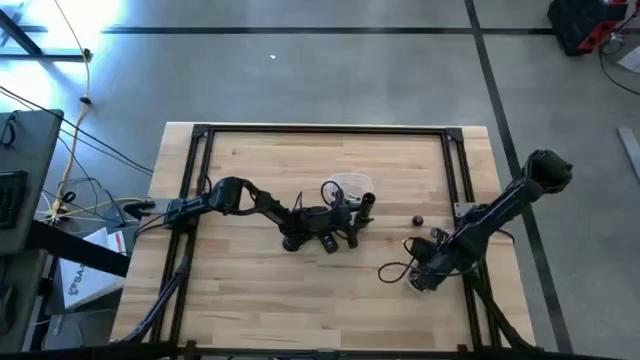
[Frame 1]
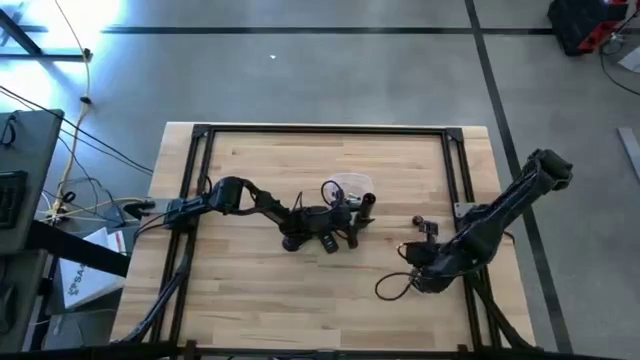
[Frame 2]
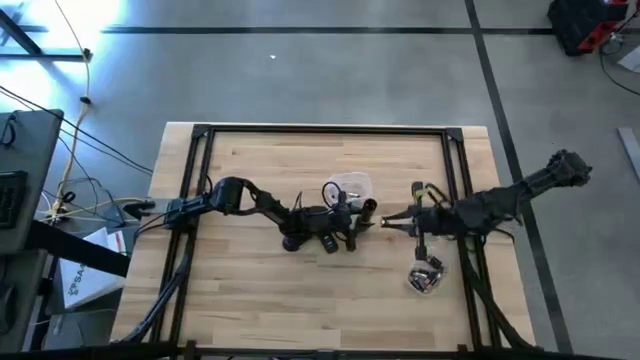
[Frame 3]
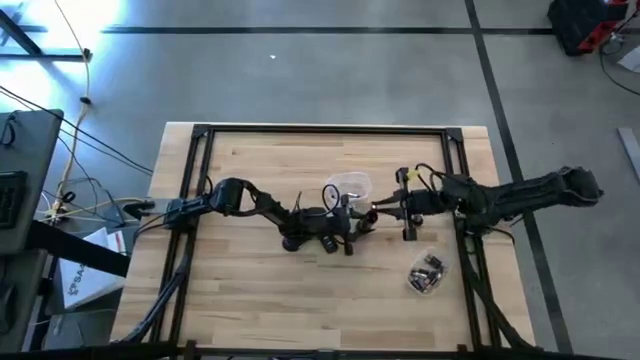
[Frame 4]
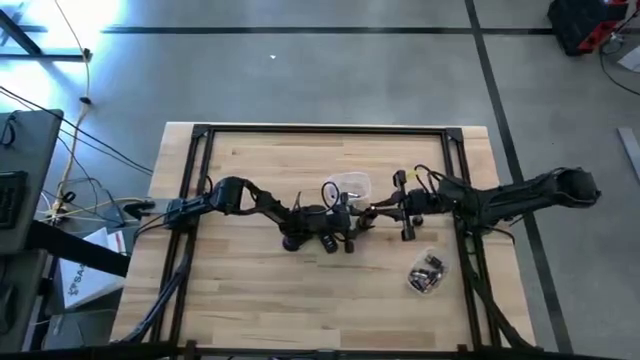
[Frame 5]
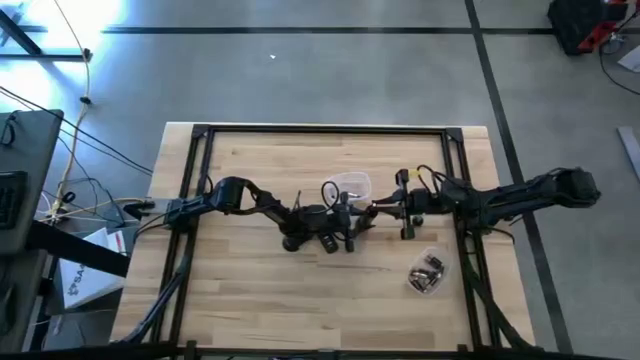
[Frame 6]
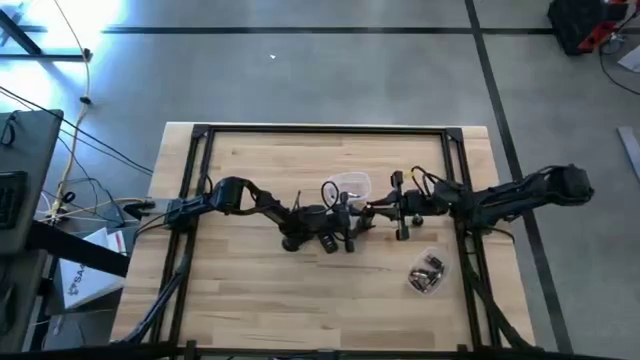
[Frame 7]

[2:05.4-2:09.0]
Task: Insert battery
Insert the black battery into the flashlight

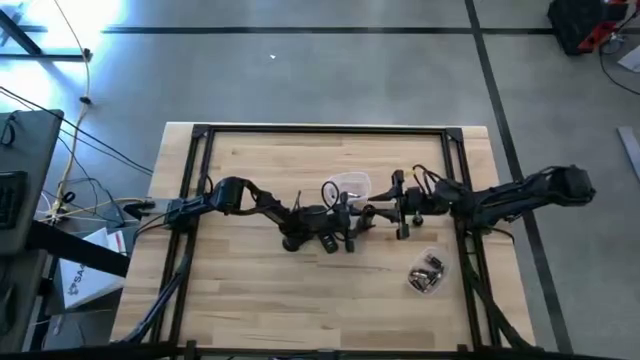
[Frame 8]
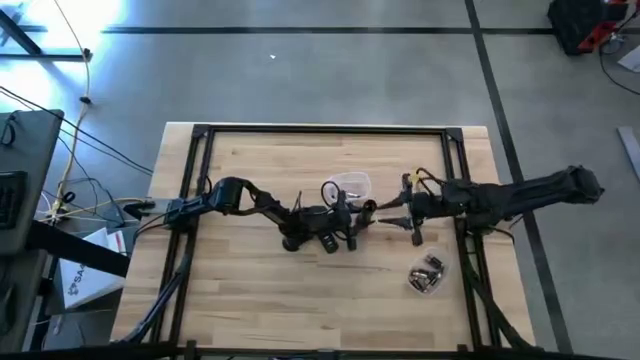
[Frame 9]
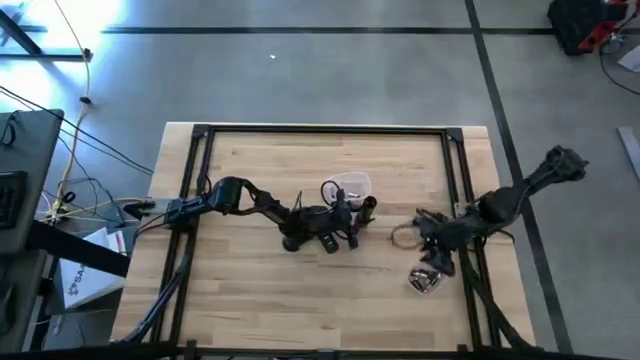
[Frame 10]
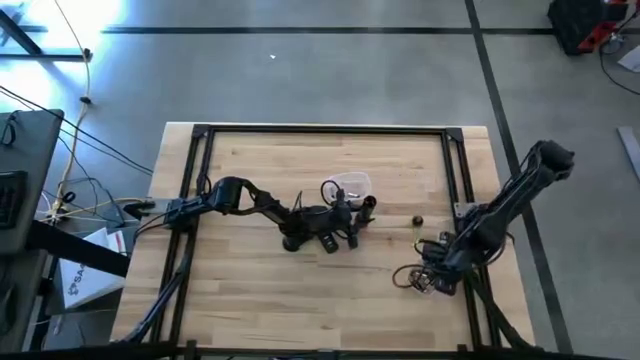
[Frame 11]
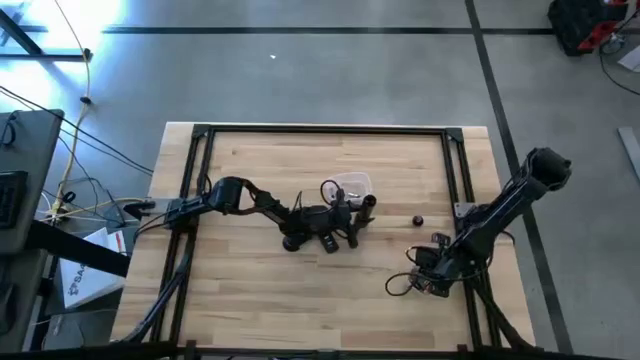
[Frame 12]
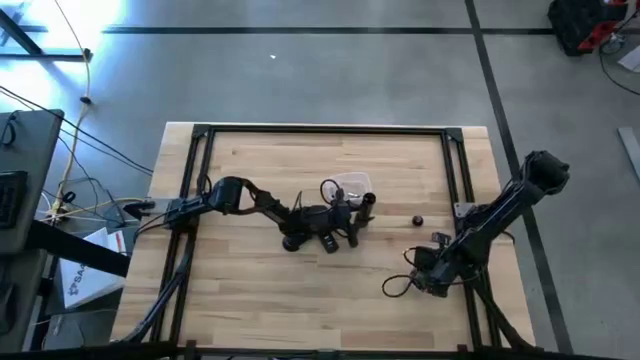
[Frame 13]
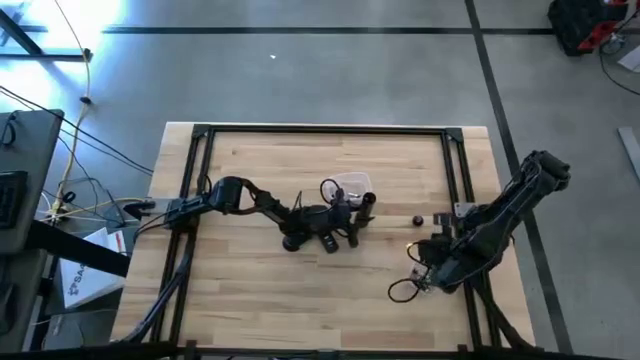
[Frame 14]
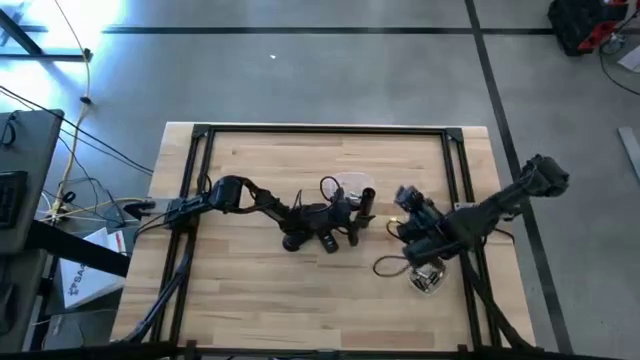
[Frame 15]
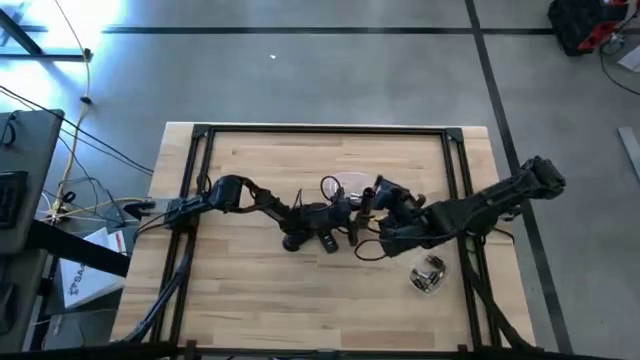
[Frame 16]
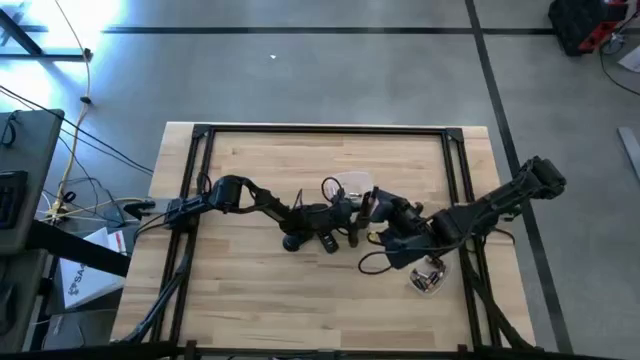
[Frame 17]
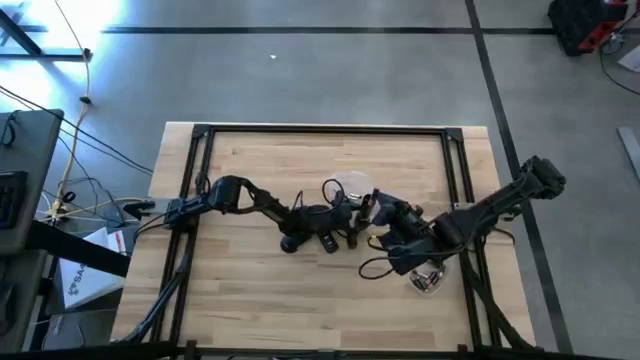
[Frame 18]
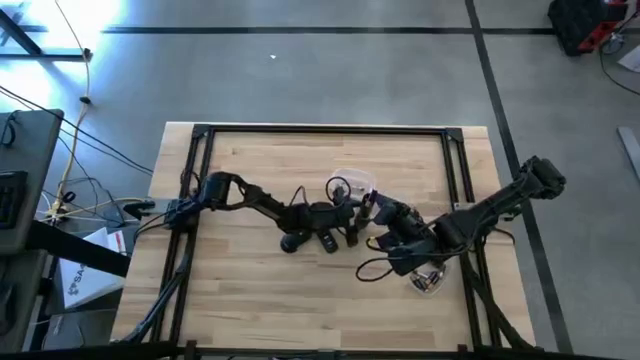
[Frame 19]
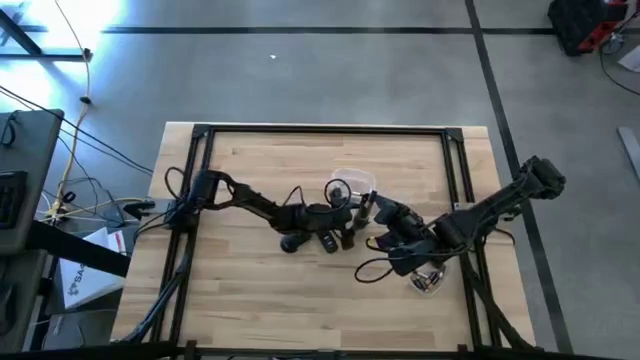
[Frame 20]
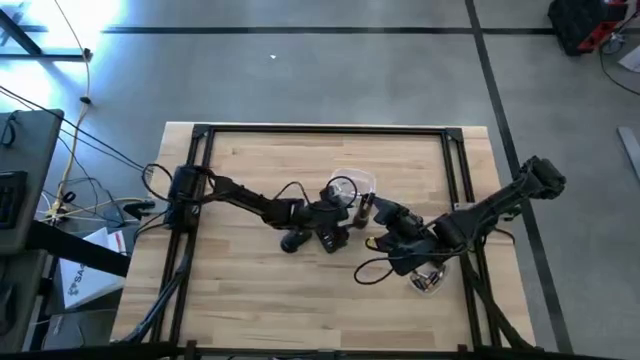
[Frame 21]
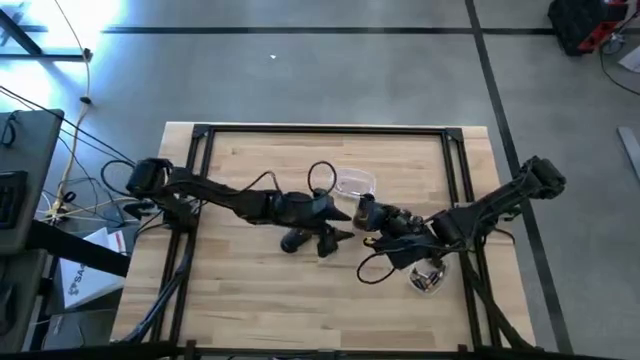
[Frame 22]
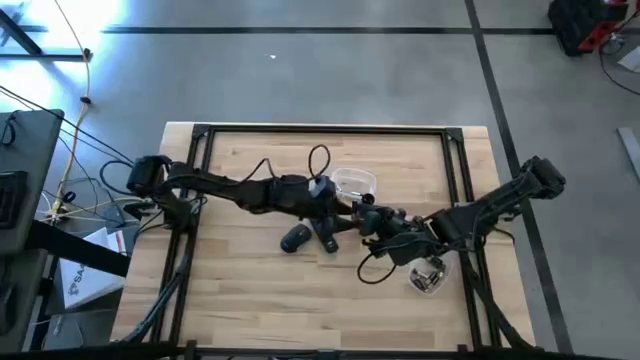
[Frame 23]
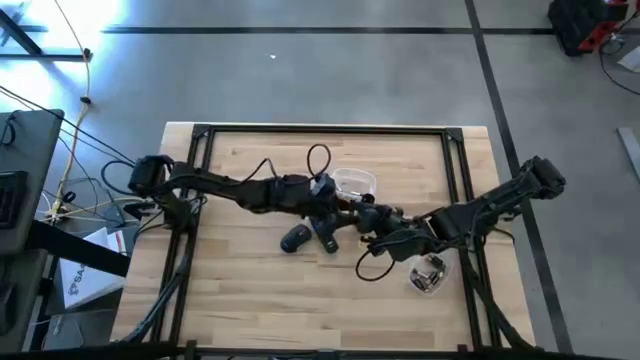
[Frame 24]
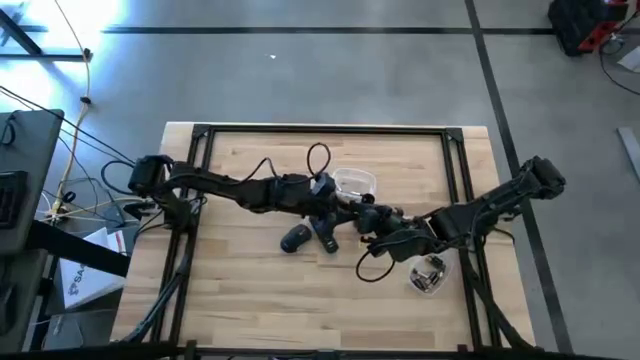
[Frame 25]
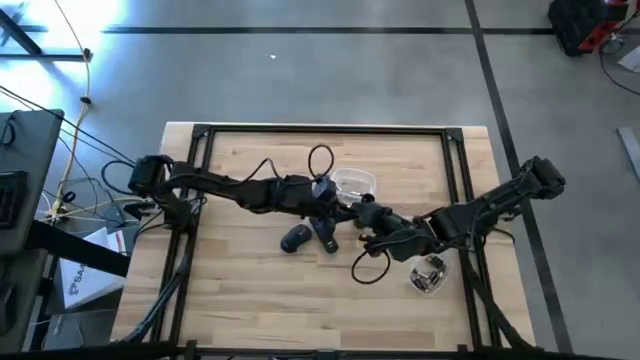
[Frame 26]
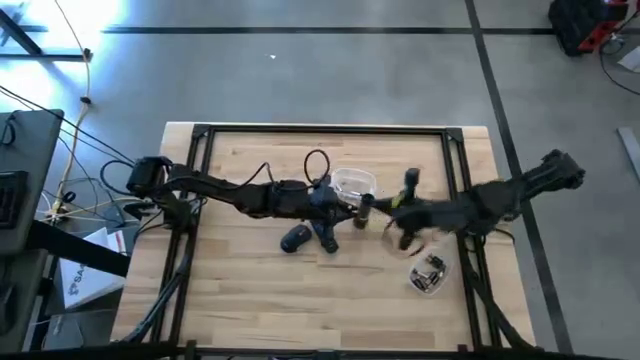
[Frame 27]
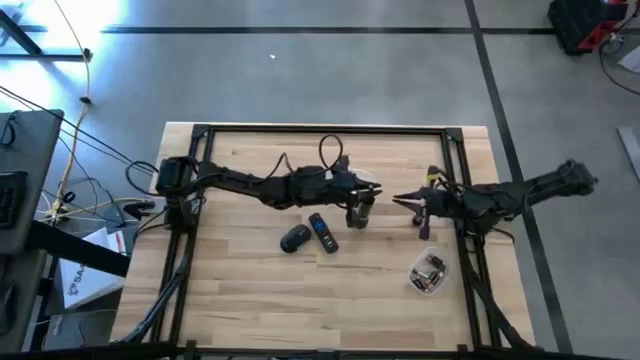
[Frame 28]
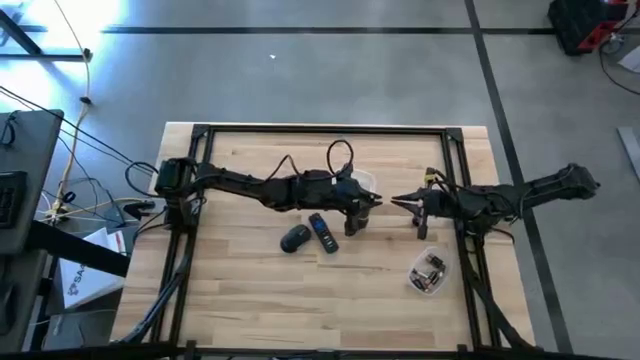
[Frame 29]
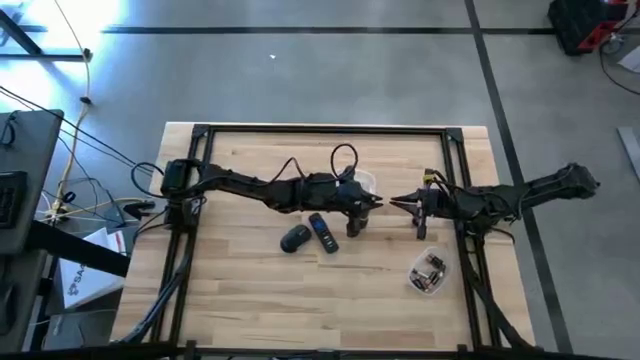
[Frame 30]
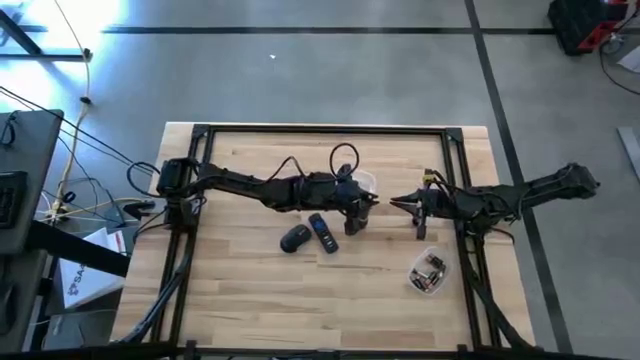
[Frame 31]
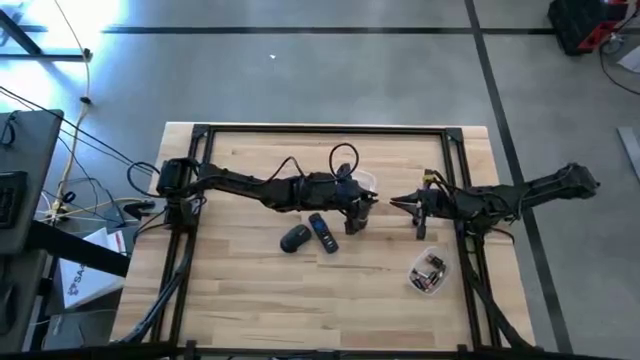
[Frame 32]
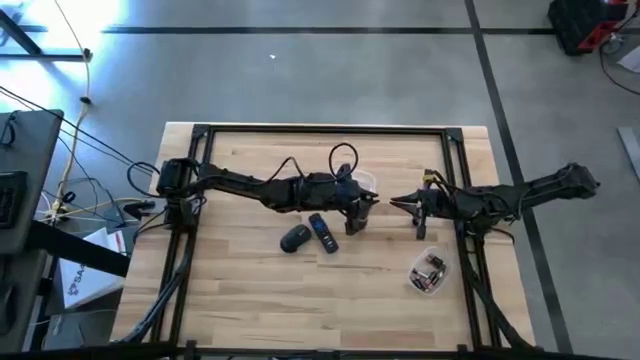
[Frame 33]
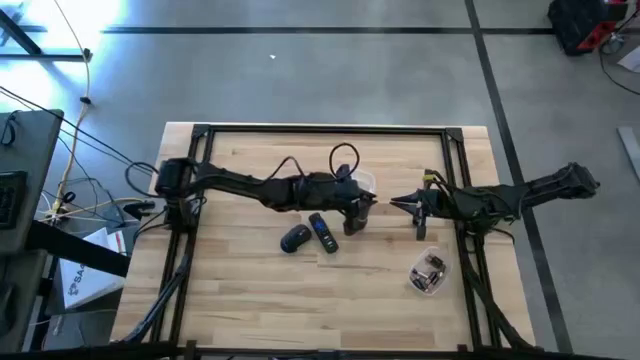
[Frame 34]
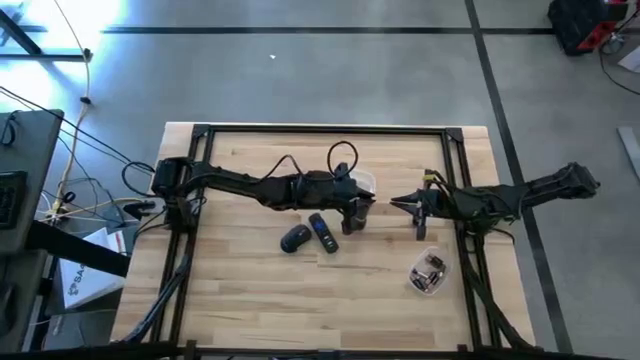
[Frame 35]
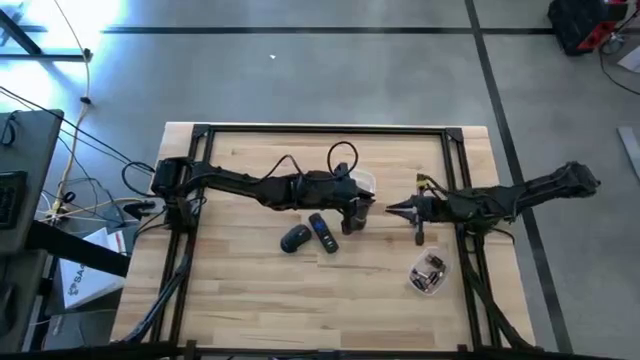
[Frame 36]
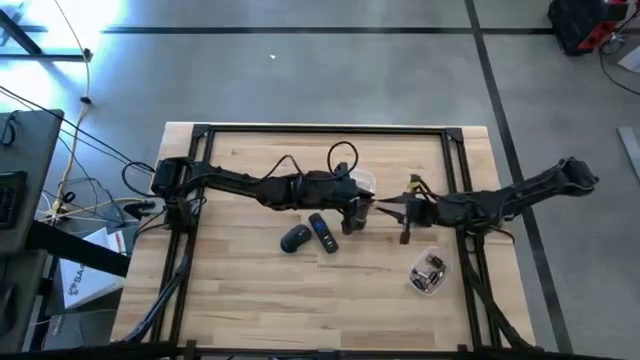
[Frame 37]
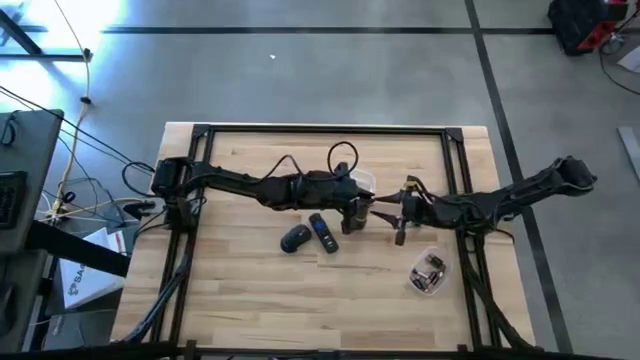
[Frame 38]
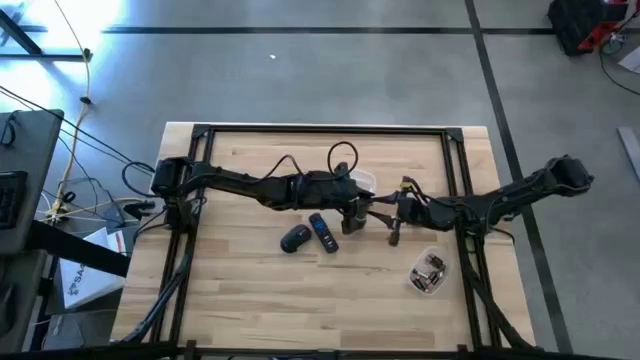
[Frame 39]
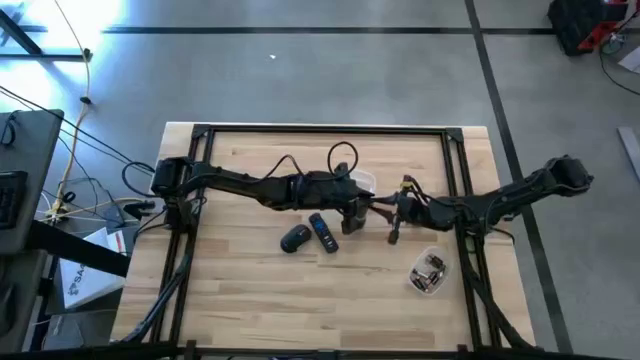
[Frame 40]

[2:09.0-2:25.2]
Insert the black battery into the flashlight
